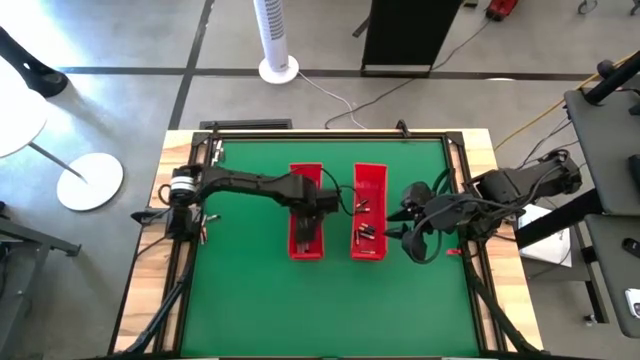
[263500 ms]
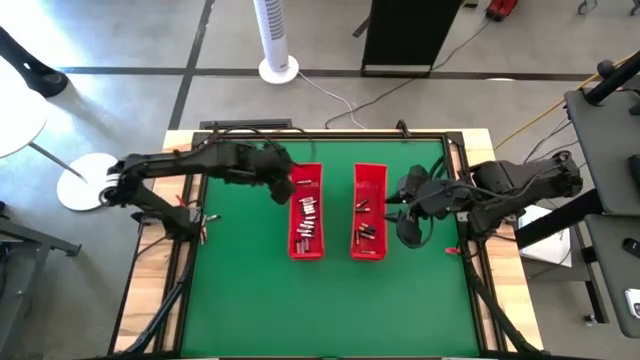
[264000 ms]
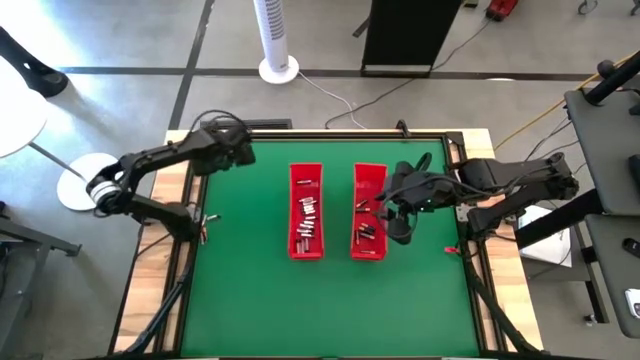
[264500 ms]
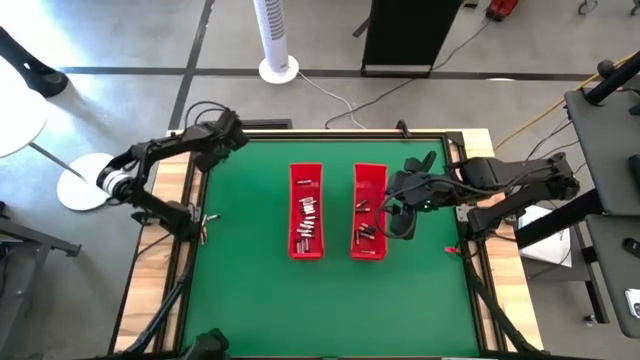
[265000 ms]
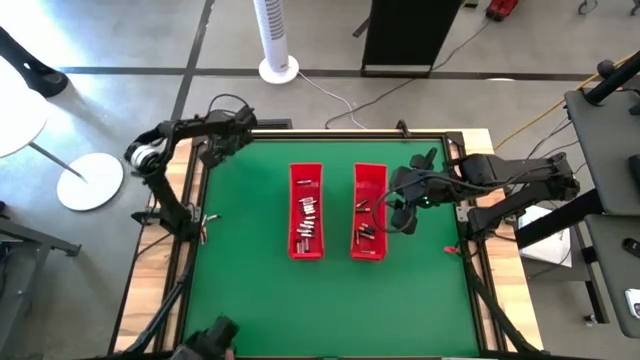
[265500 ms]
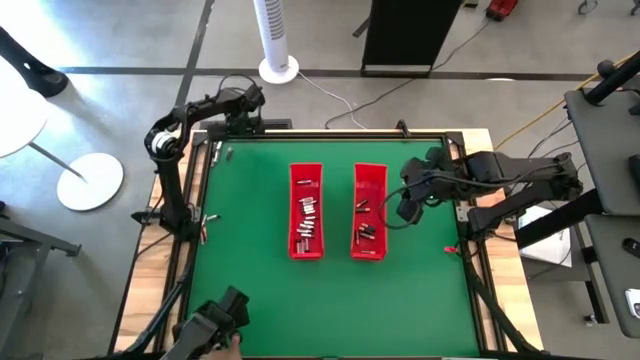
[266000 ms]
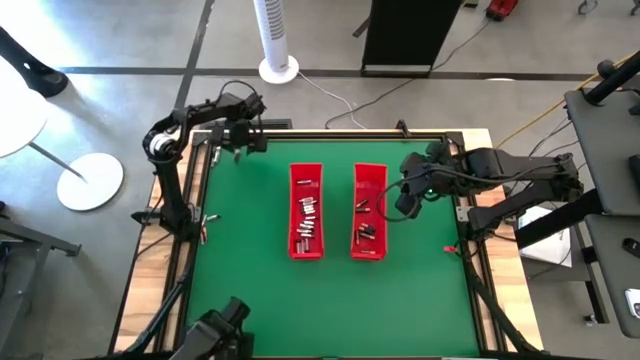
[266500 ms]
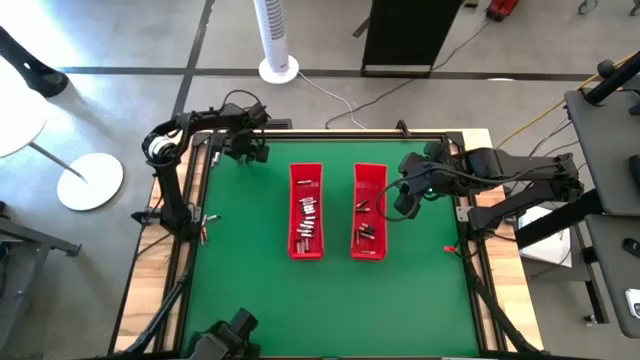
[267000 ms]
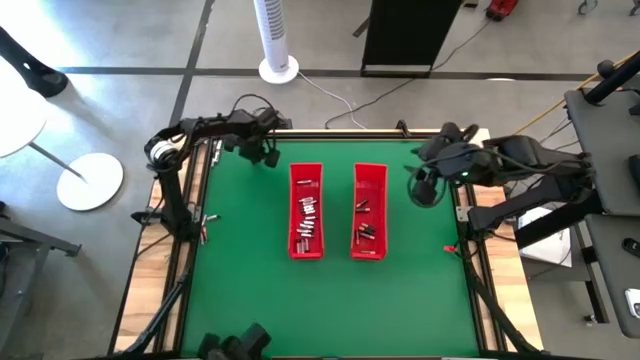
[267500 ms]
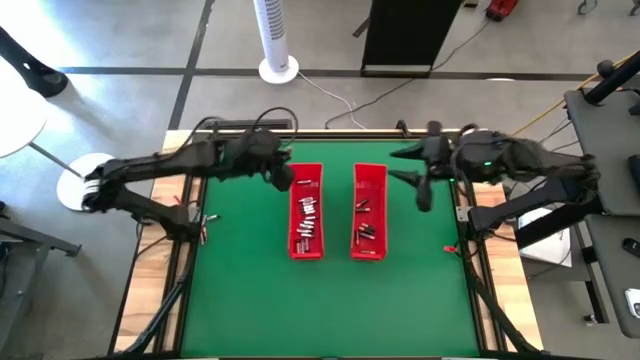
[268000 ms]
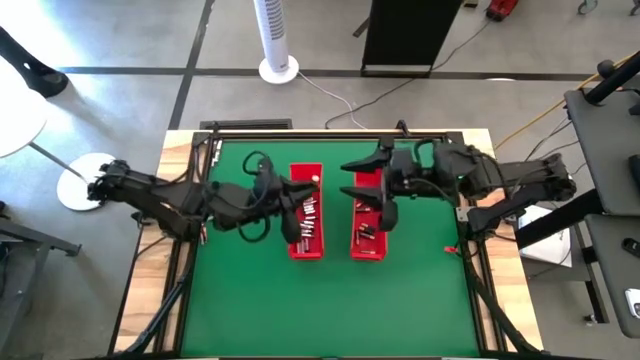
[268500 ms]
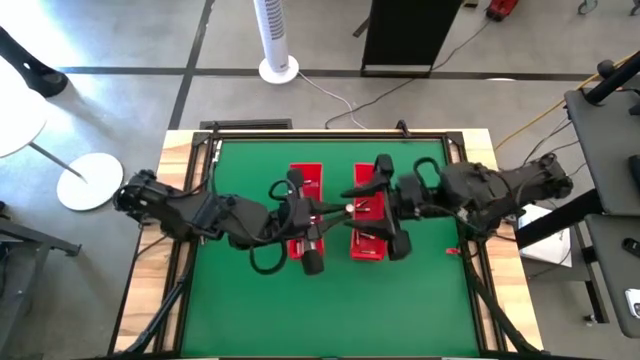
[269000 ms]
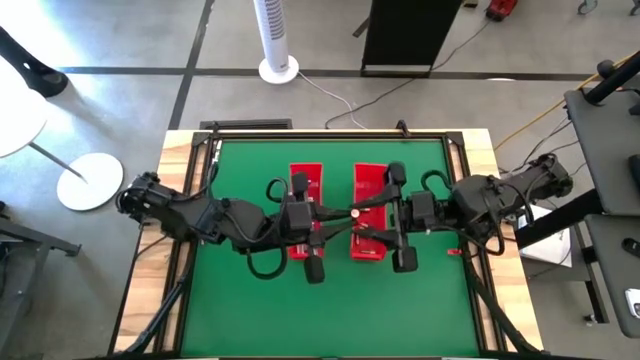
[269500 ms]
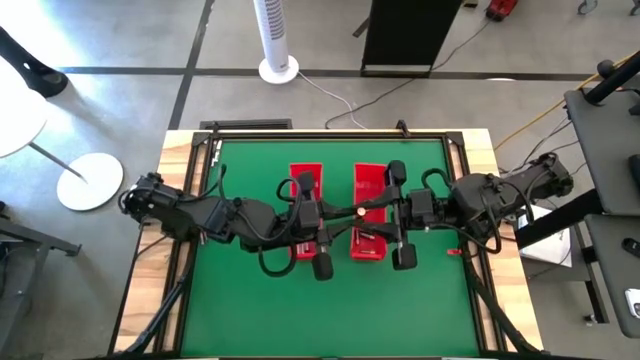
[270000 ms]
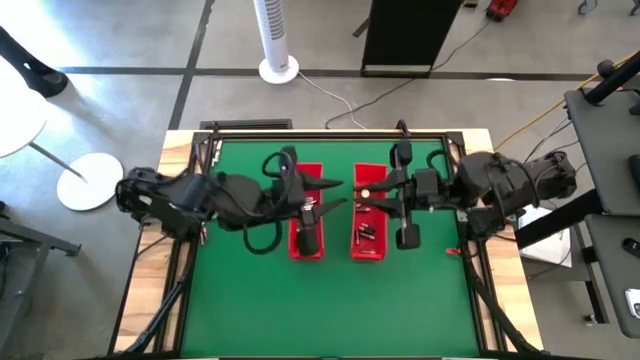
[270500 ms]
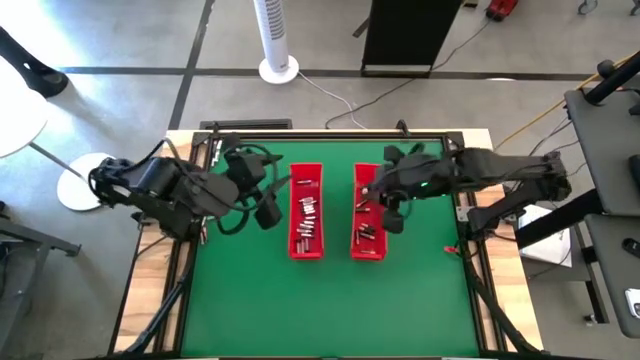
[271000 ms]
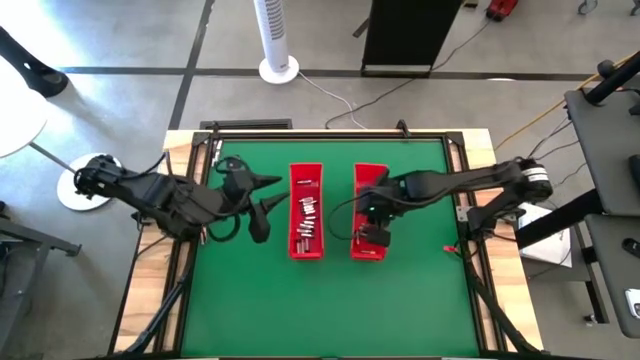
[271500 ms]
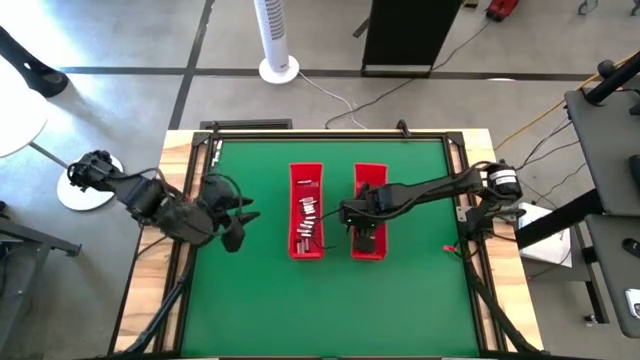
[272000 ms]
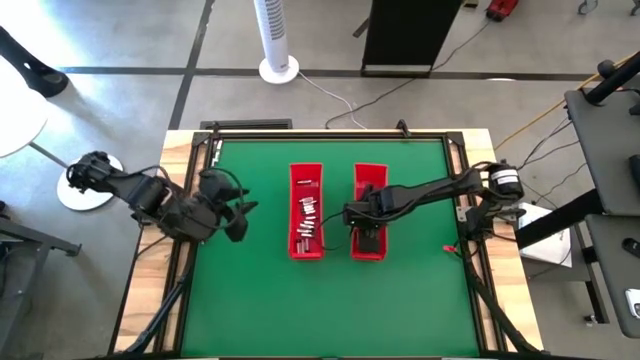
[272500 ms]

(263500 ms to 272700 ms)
Task: Sort batteries
Put the black battery into the right red bin

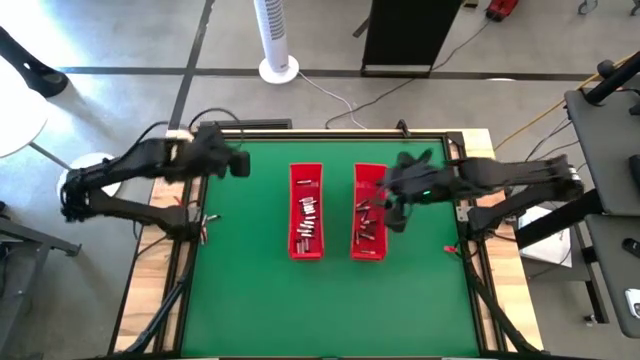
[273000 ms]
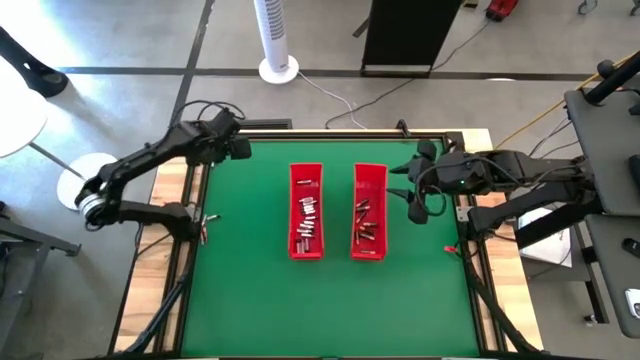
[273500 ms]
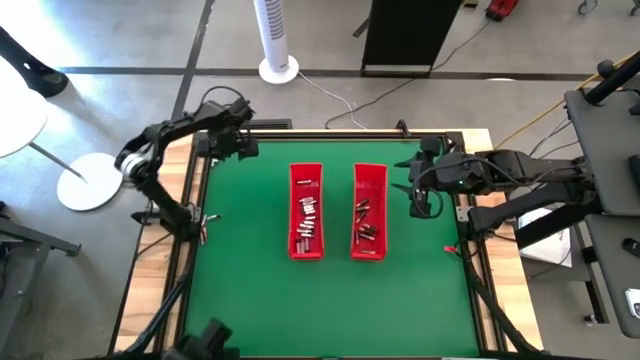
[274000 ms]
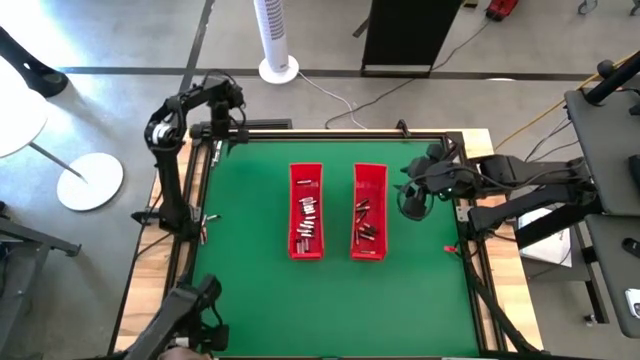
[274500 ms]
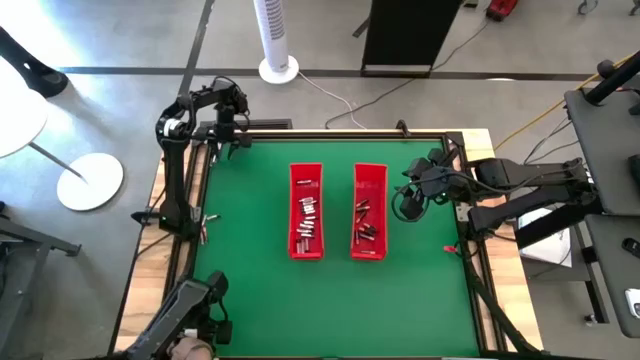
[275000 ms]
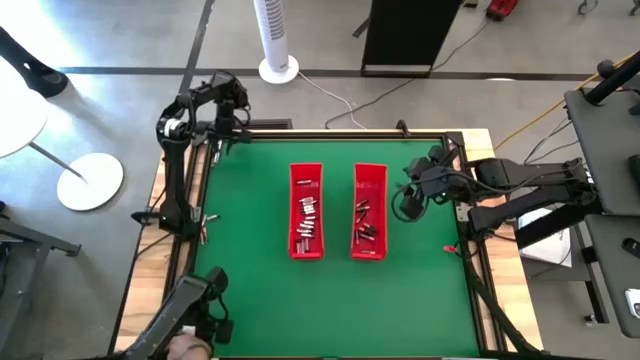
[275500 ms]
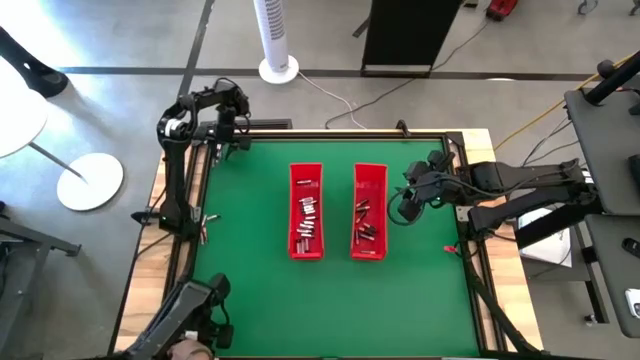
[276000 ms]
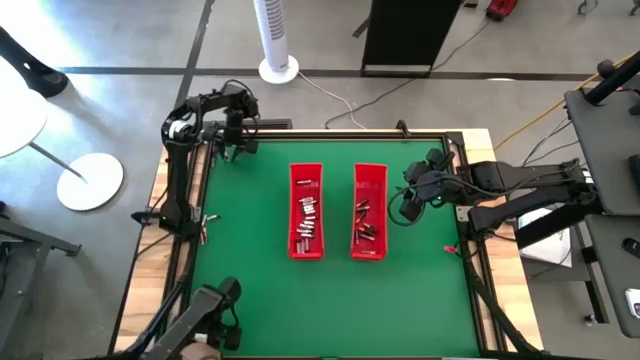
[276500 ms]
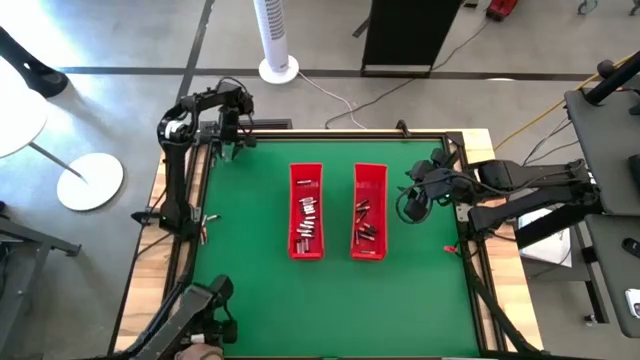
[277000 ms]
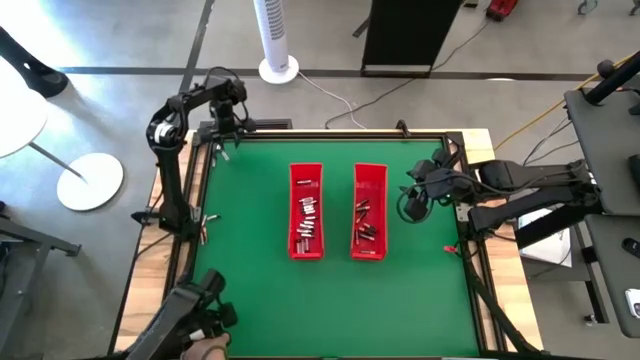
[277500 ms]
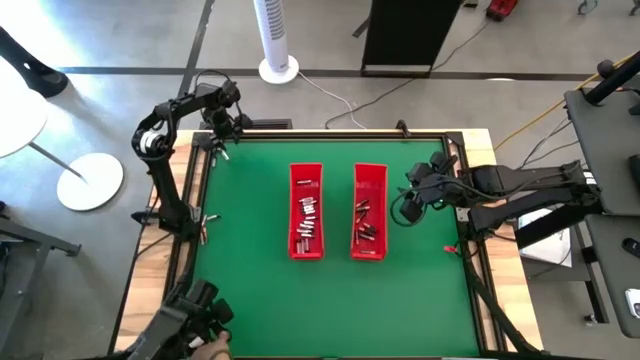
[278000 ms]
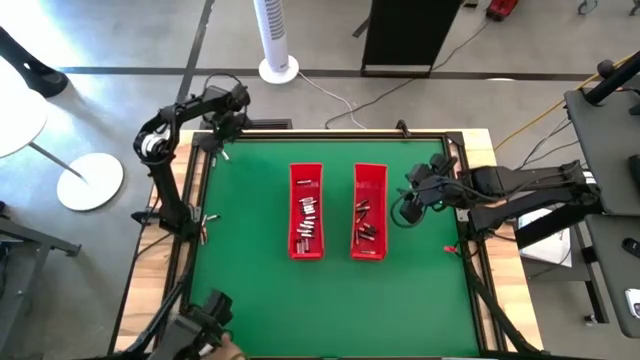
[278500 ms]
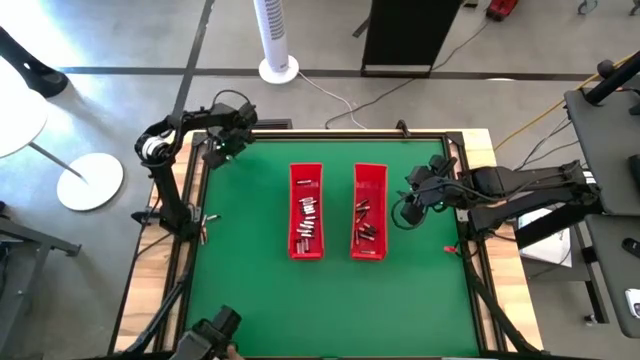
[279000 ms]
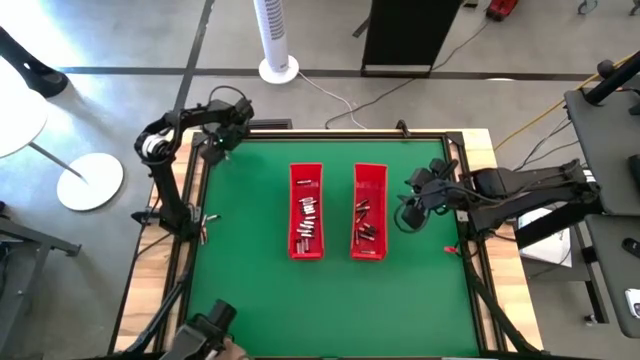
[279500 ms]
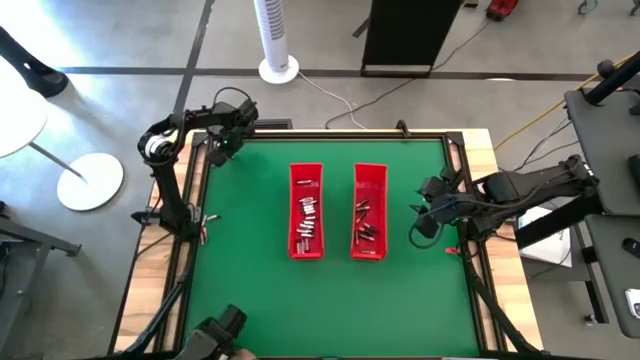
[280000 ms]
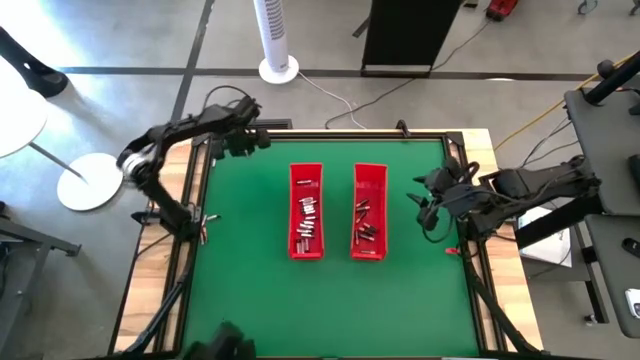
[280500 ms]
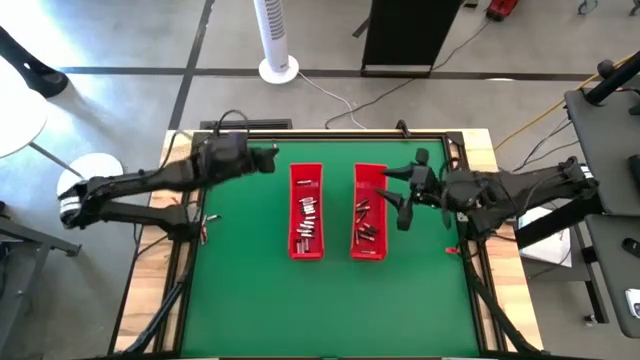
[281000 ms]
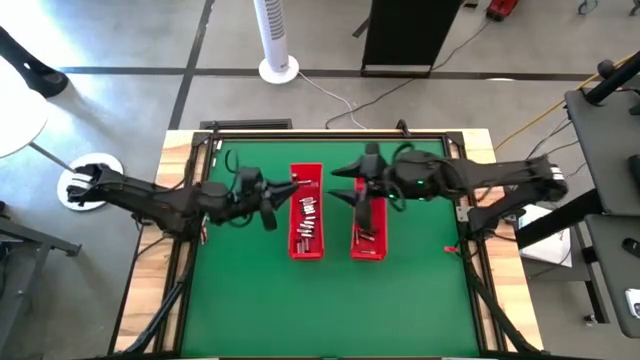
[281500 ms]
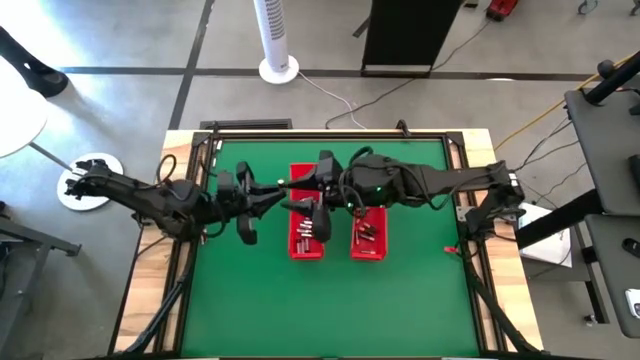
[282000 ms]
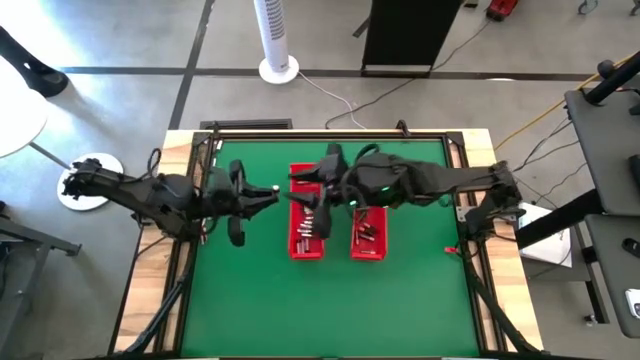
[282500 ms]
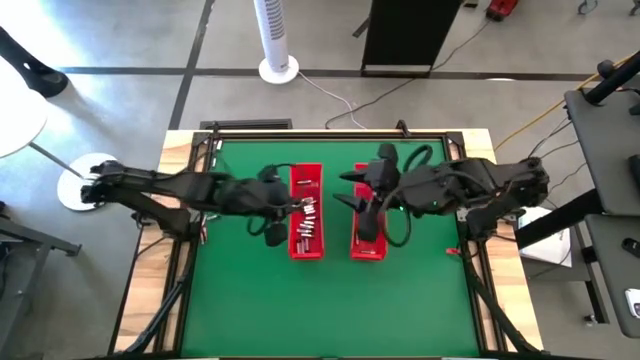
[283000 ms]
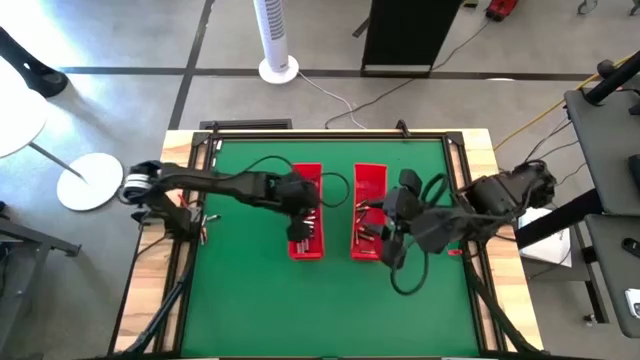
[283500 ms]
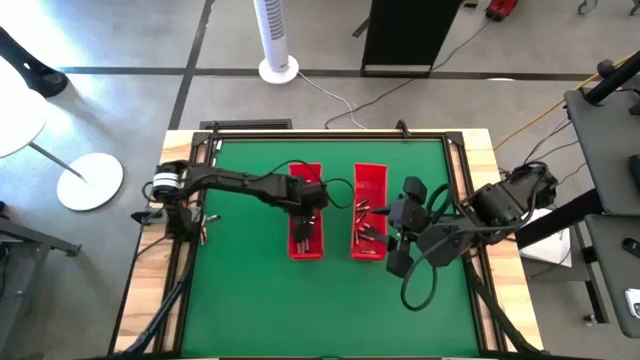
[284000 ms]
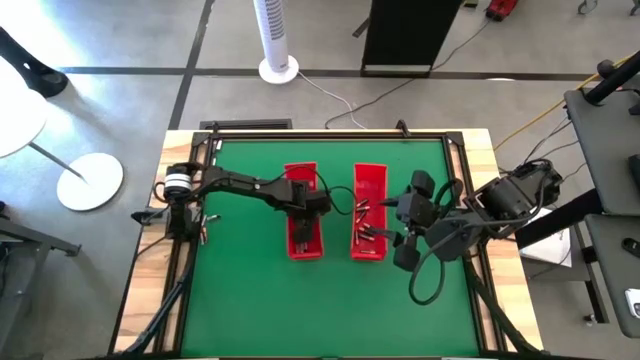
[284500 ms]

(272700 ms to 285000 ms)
Put the silver battery into the left red bin
